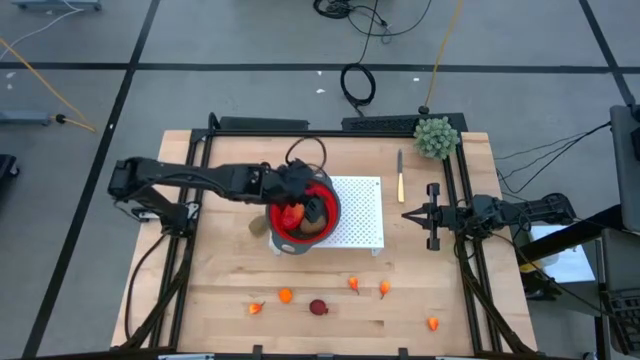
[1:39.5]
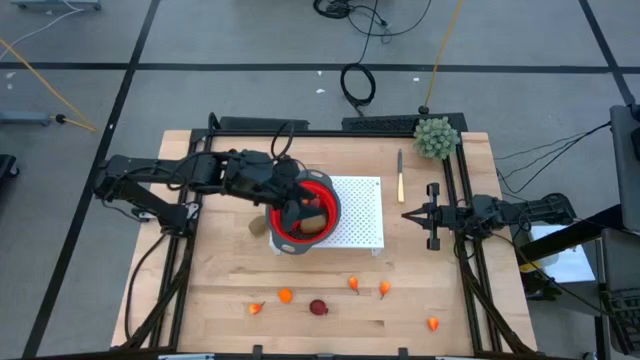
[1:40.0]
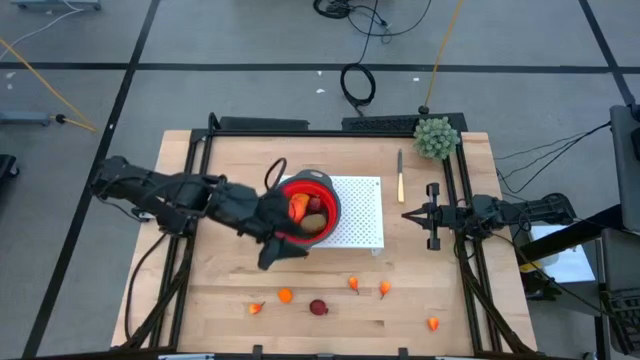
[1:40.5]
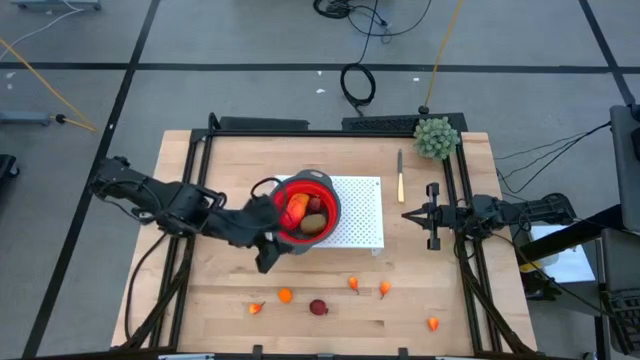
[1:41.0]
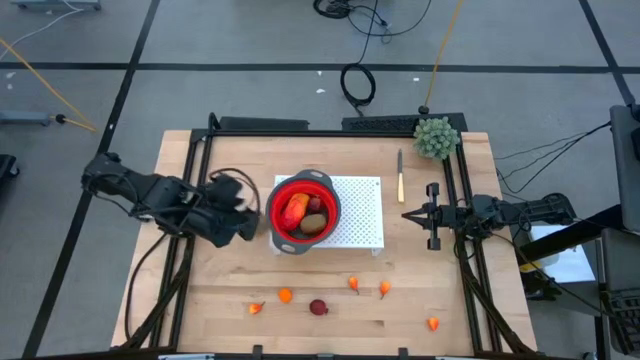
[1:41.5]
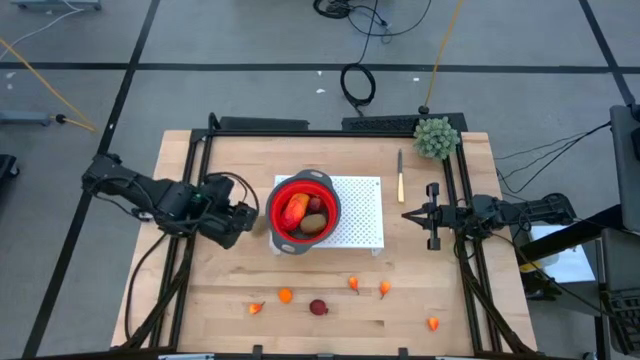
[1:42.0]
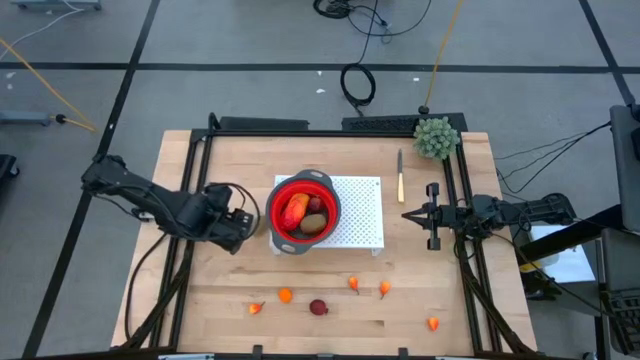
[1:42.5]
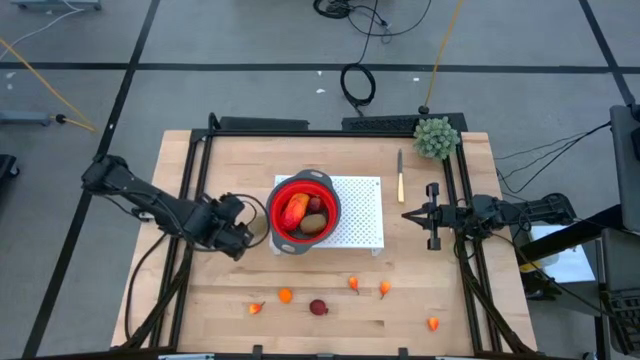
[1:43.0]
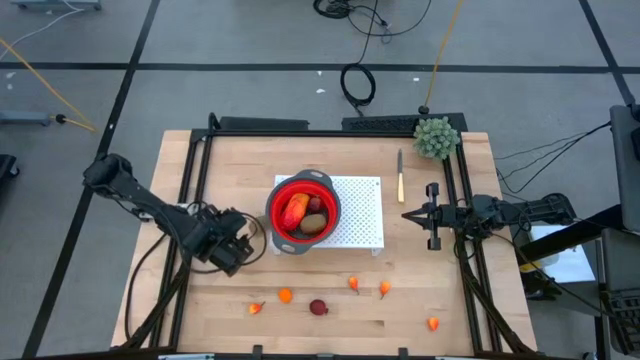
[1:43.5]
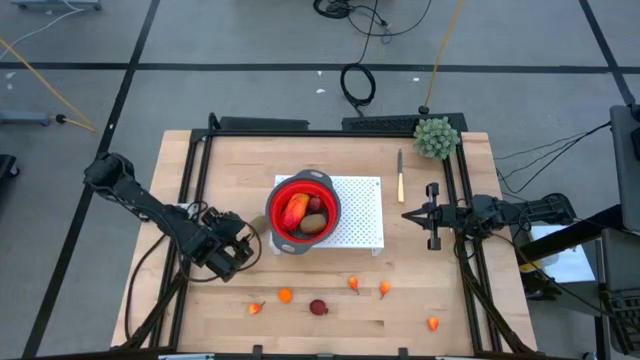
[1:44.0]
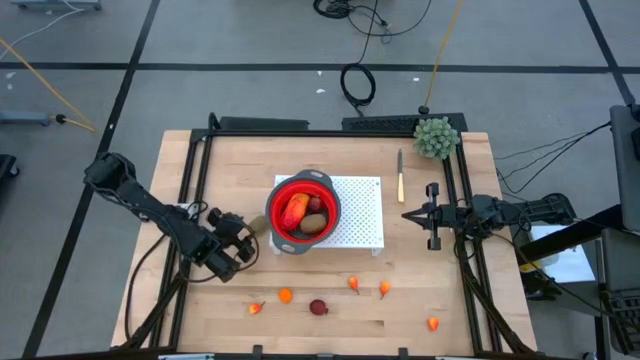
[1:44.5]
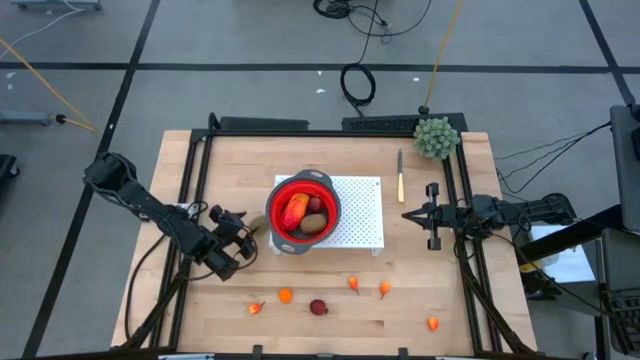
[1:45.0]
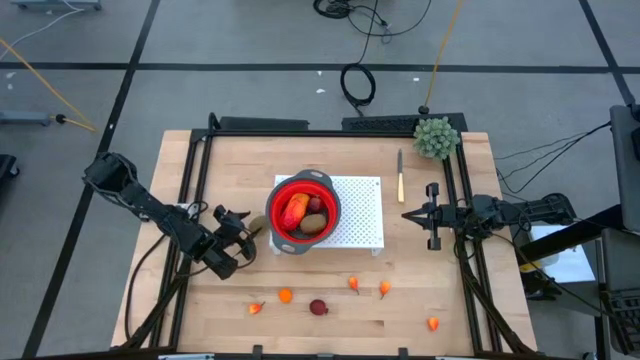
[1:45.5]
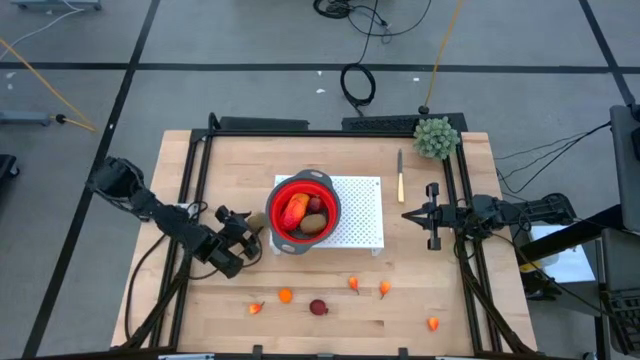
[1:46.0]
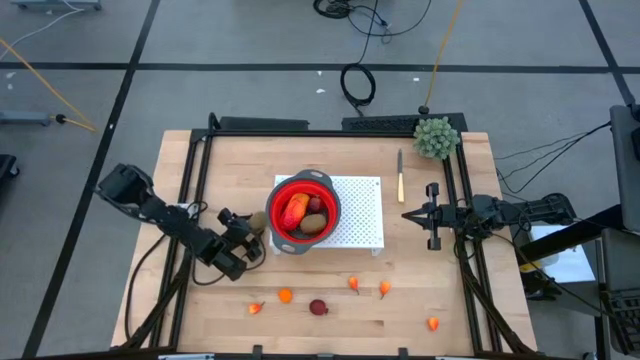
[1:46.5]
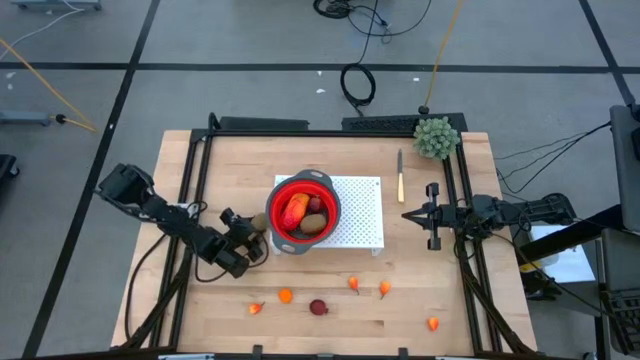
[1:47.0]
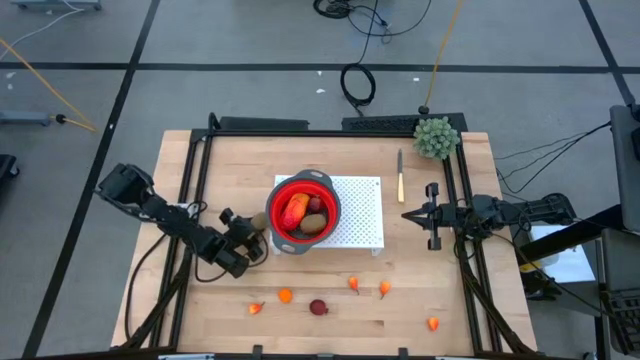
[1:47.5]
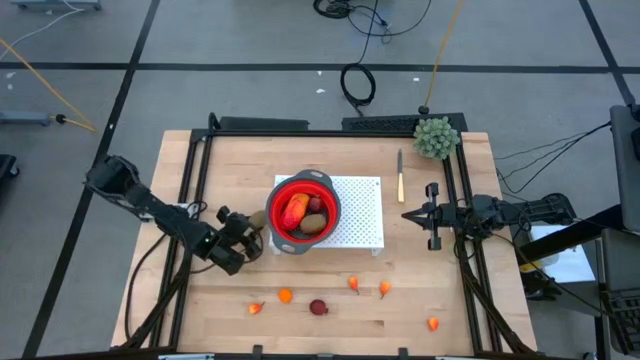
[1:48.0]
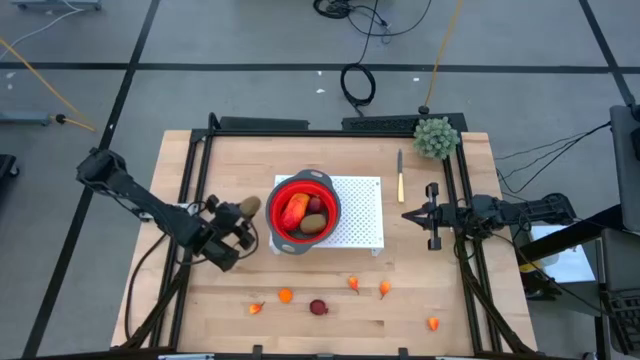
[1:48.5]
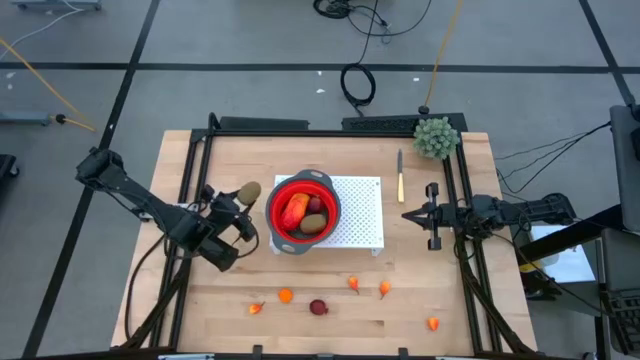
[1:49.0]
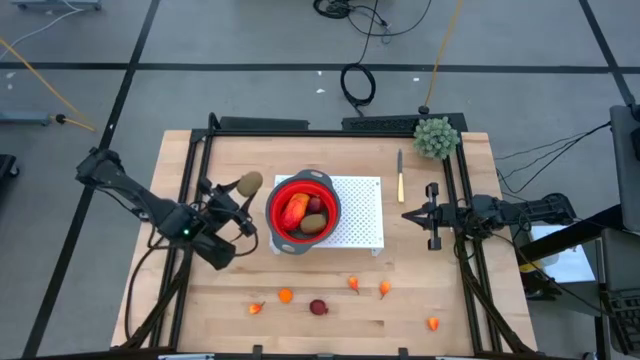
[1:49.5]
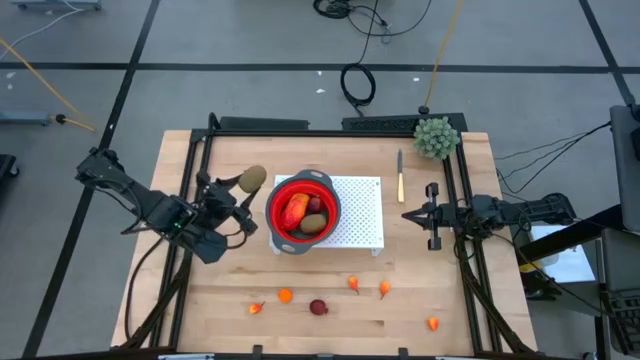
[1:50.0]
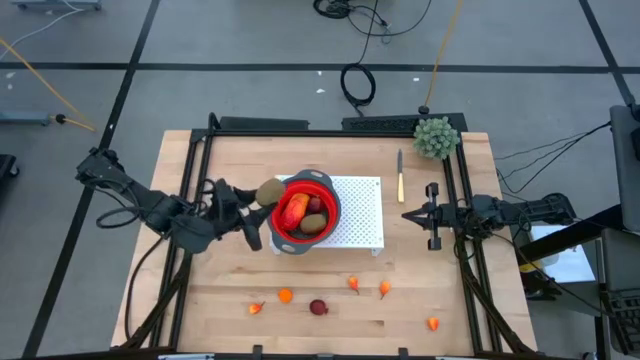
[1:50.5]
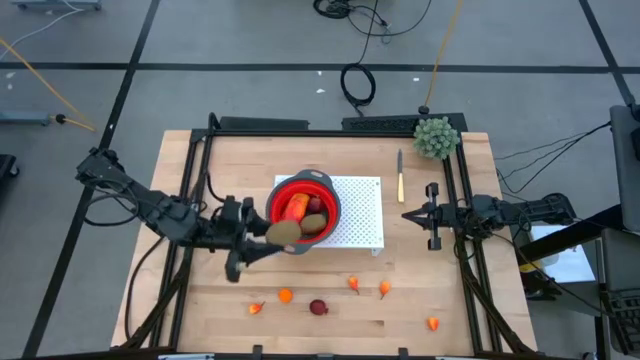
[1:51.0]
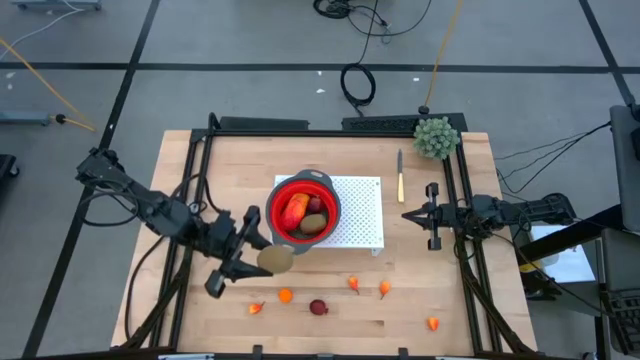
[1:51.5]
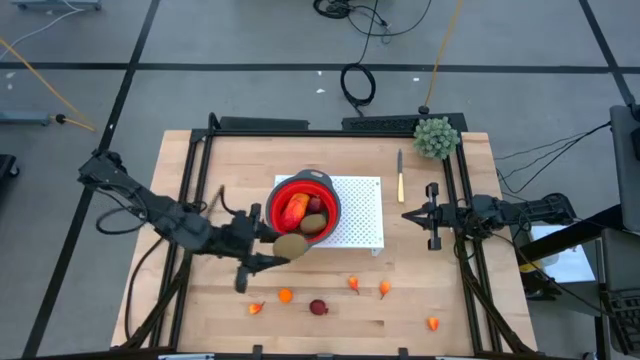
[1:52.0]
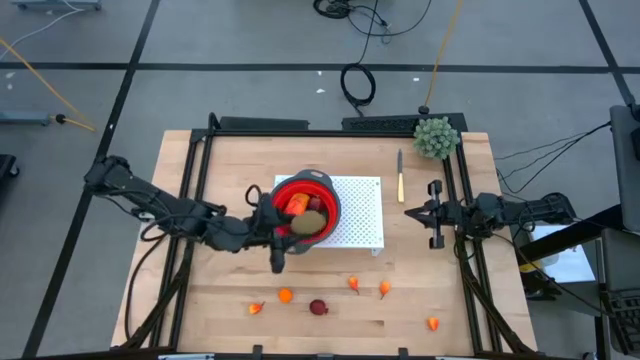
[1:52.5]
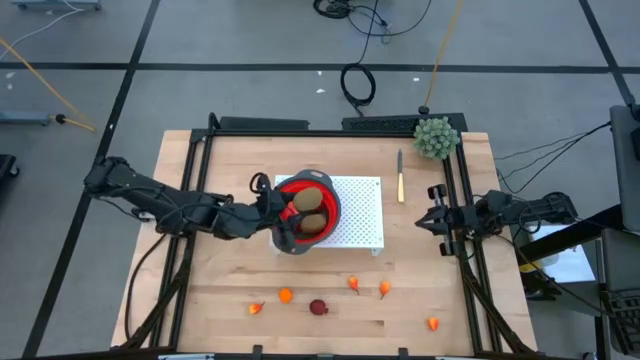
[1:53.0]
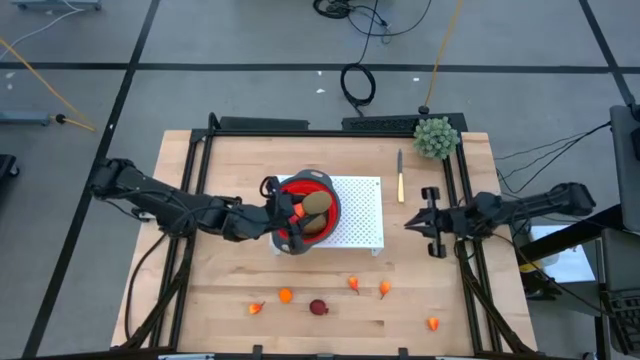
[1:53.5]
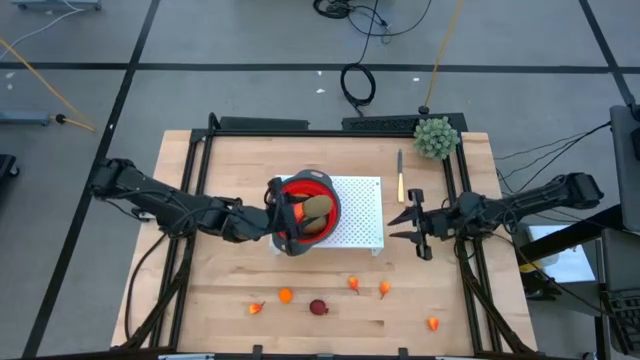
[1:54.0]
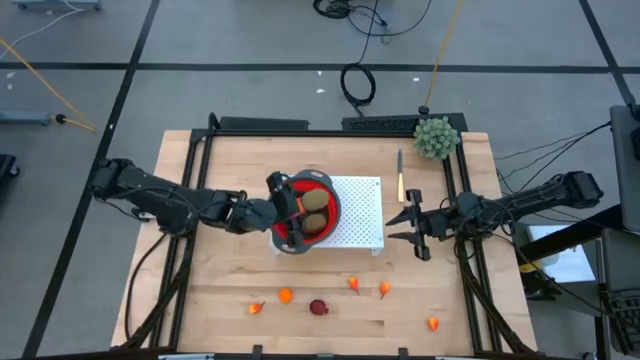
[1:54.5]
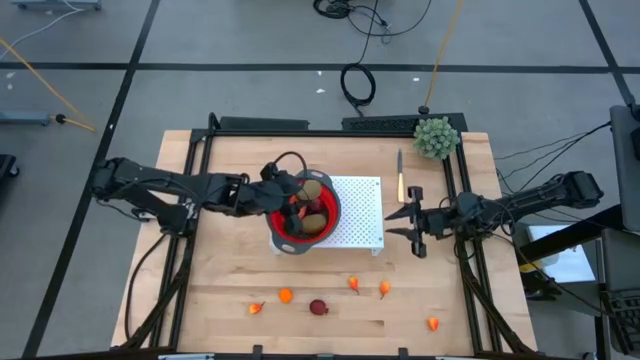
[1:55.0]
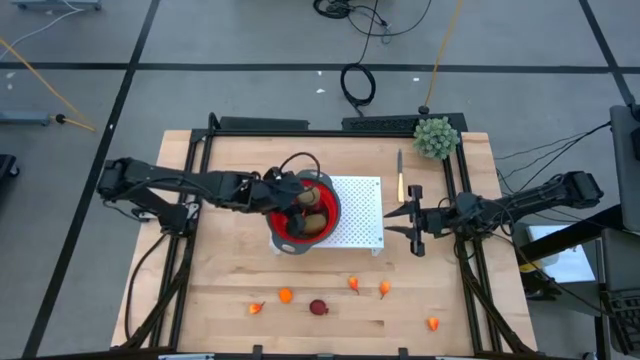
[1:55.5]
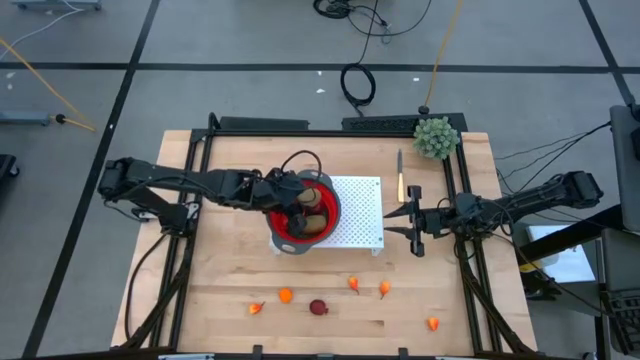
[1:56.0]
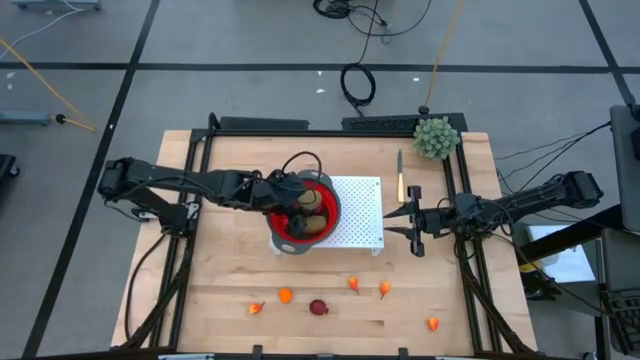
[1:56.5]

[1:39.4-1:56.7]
Task: Pick & Place Fruit
Put the kiwi into the strainer bowl on the shelf

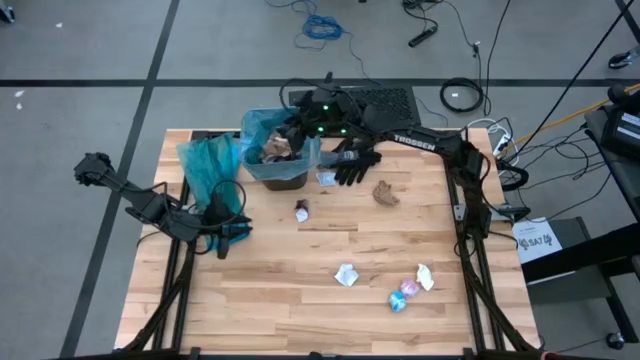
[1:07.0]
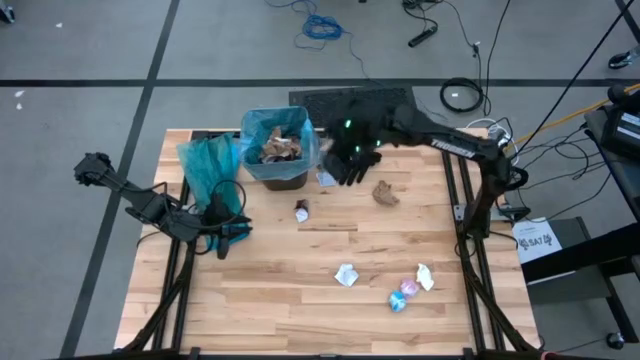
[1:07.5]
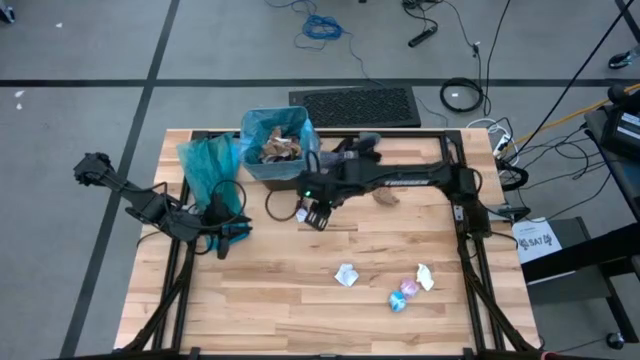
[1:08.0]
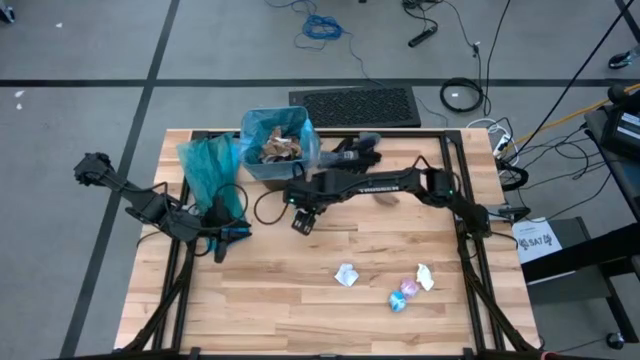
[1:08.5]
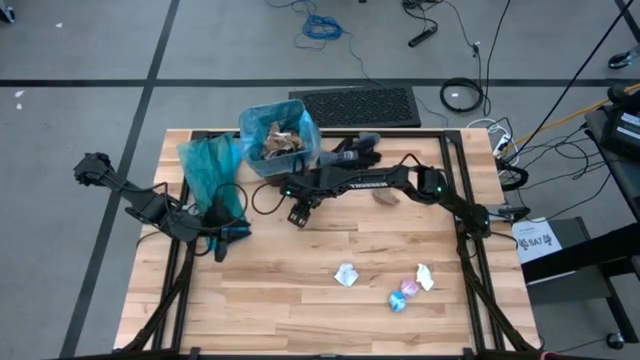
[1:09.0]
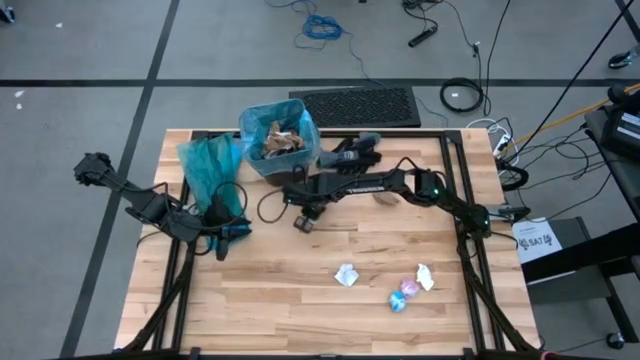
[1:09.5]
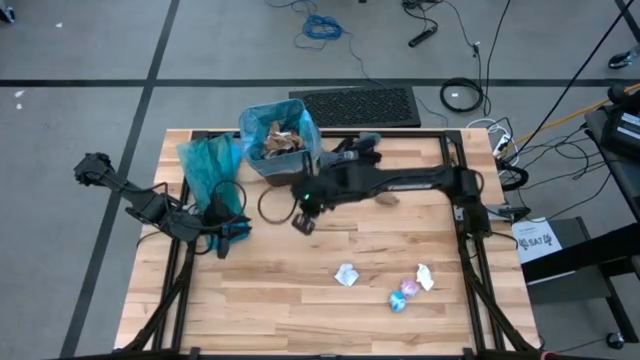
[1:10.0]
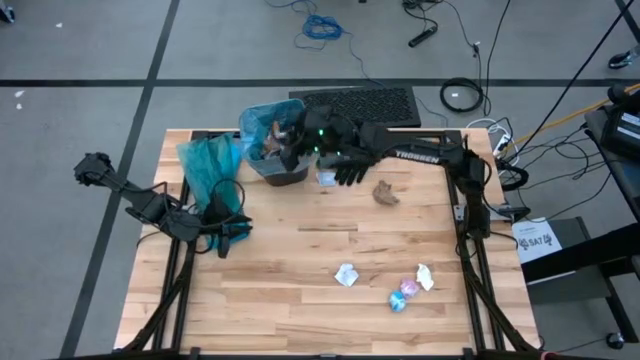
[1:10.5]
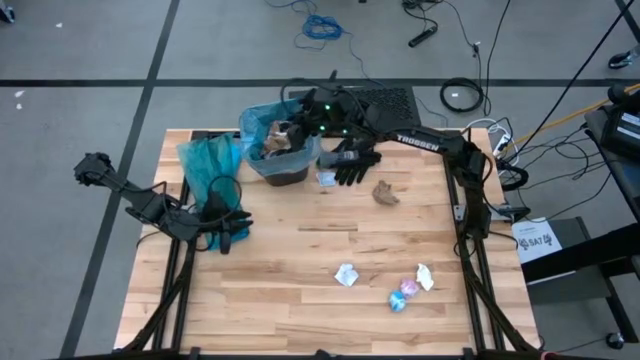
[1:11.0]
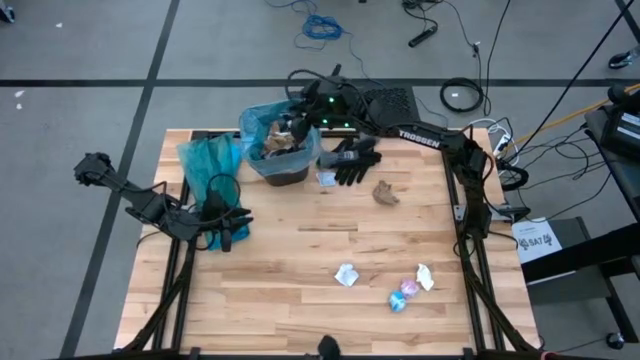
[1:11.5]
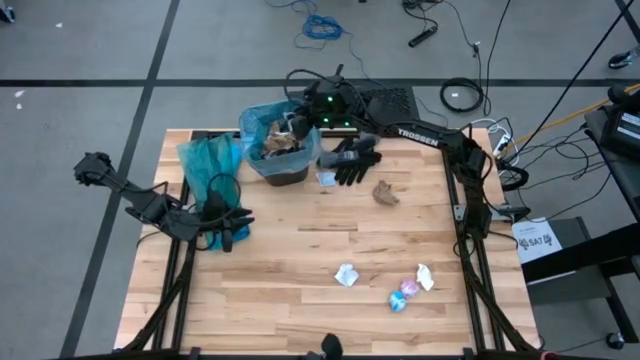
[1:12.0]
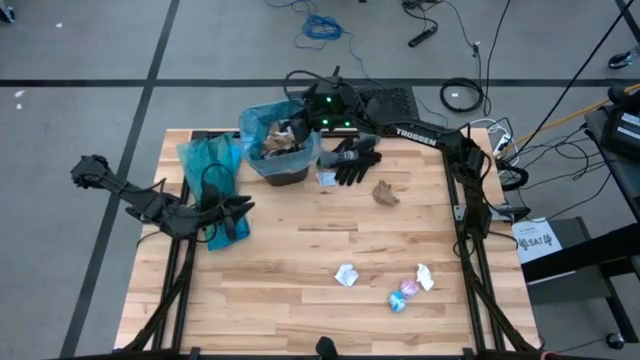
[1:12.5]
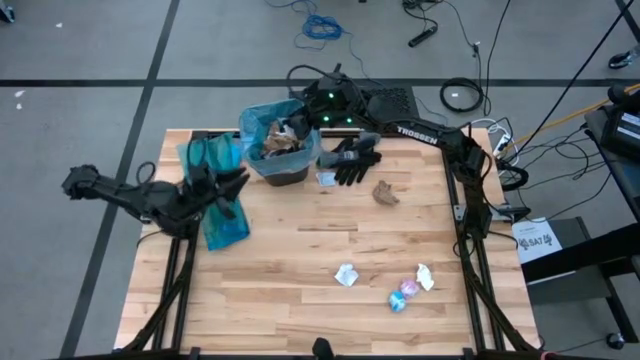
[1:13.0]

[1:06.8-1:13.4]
Task: place trash/remove bag and relplace
Put the white cardboard into the trash bin
